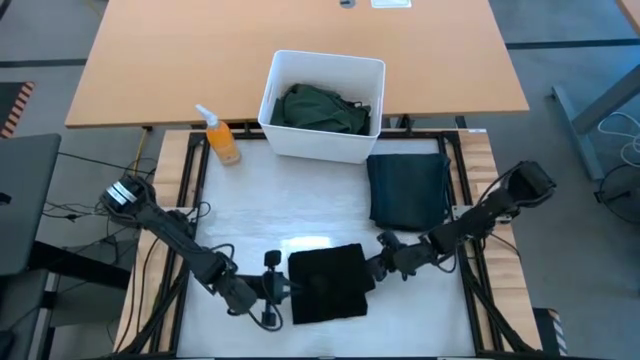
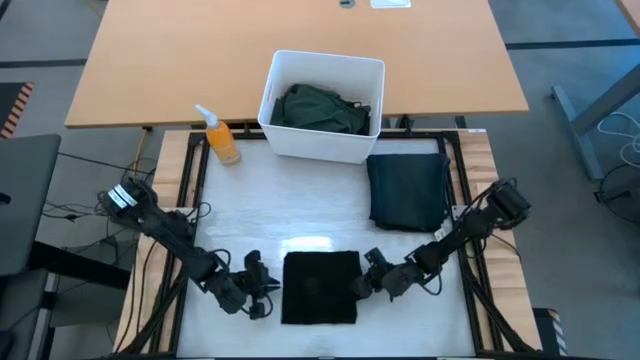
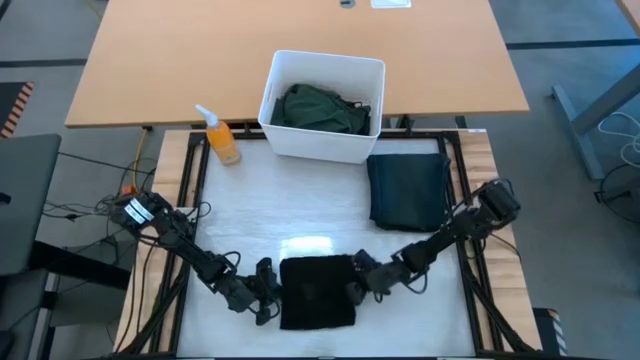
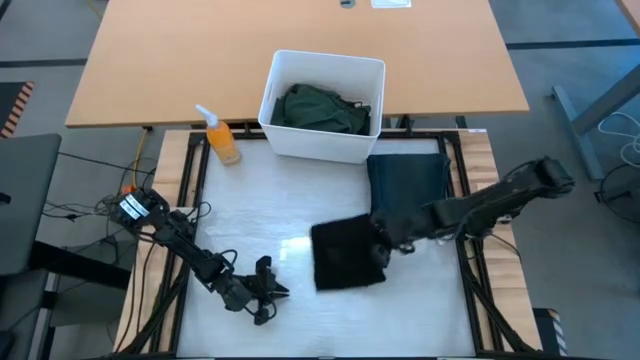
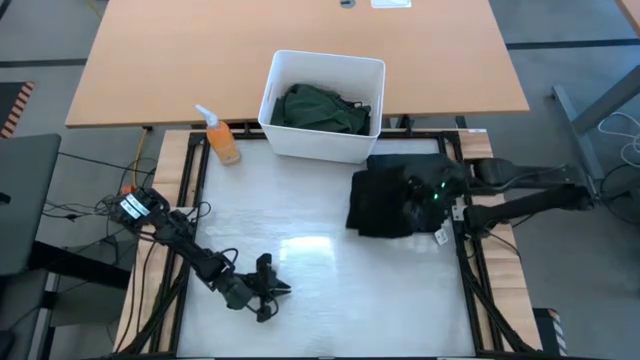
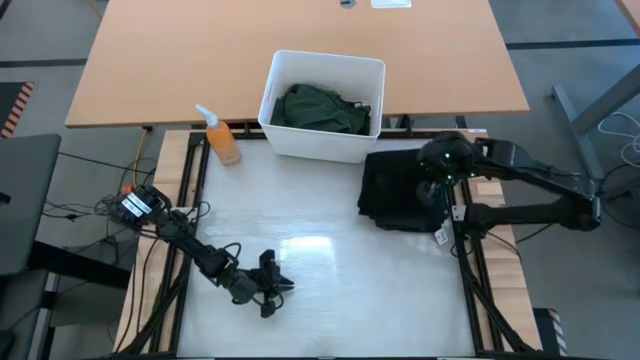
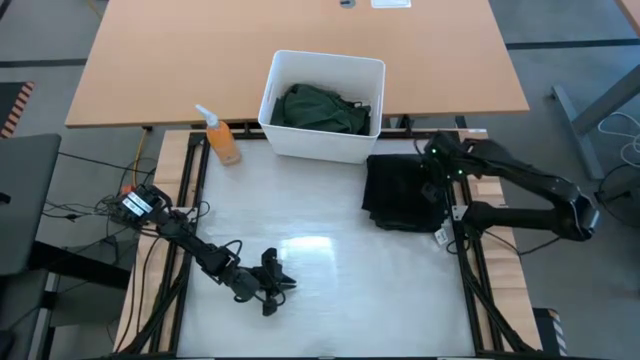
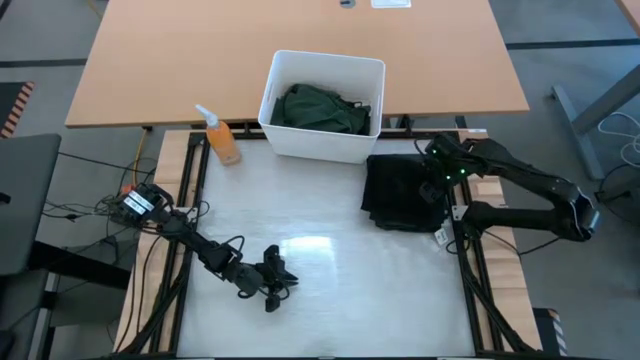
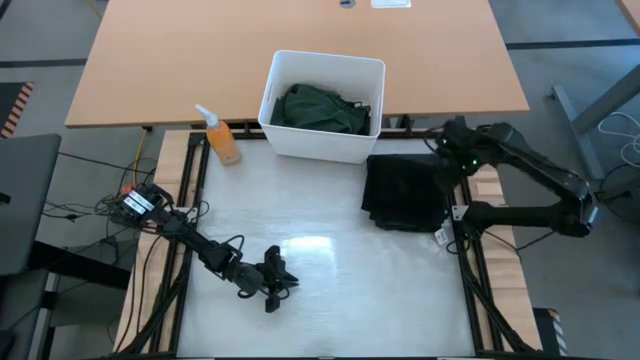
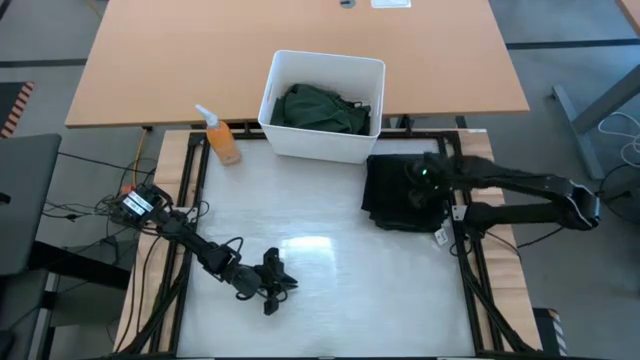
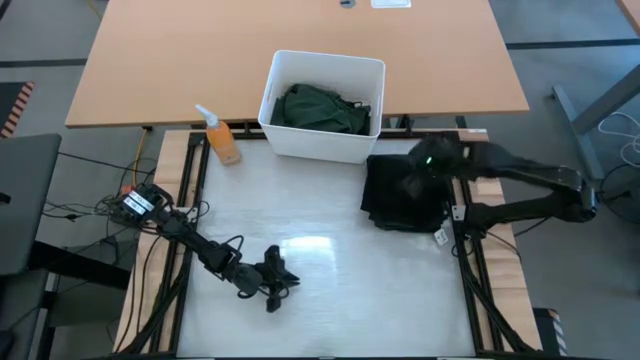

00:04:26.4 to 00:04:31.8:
Task: Fold laundry
Stack the folded black t-shirt on the dark blue jeans

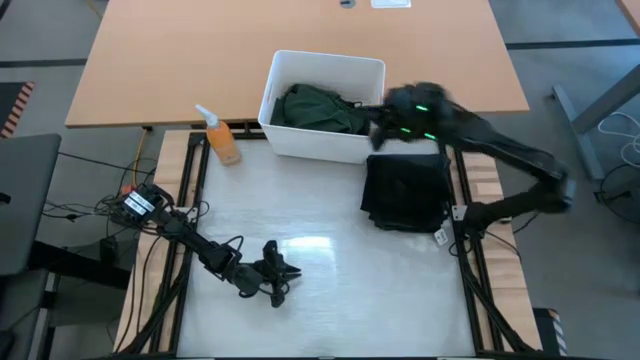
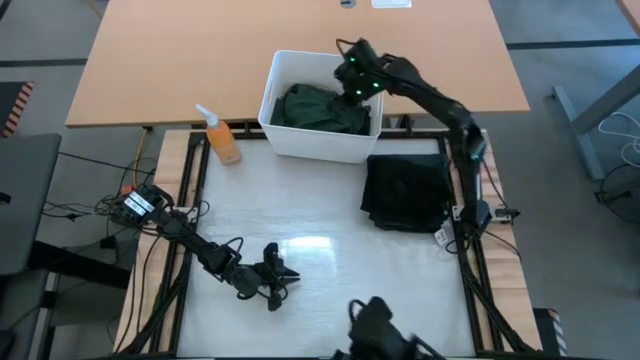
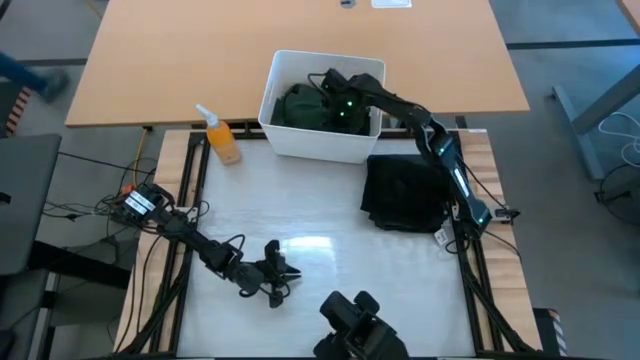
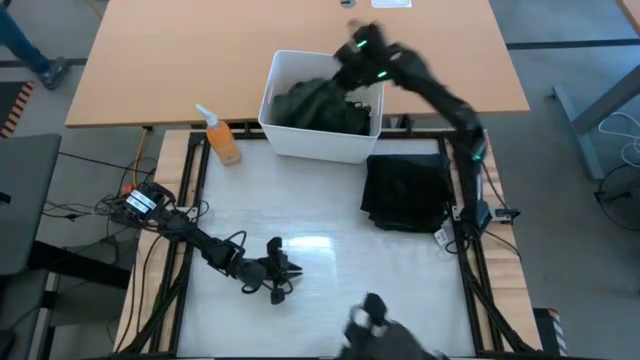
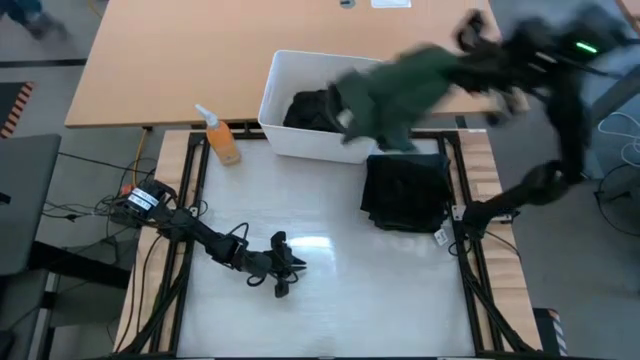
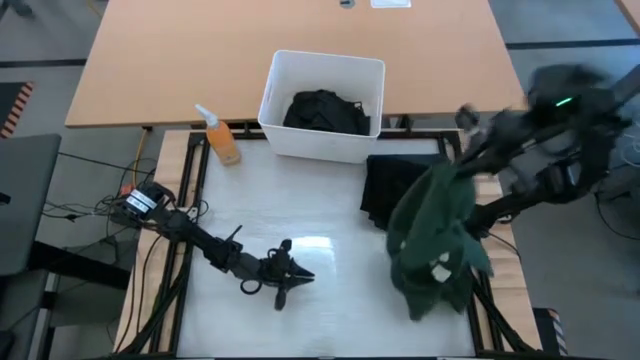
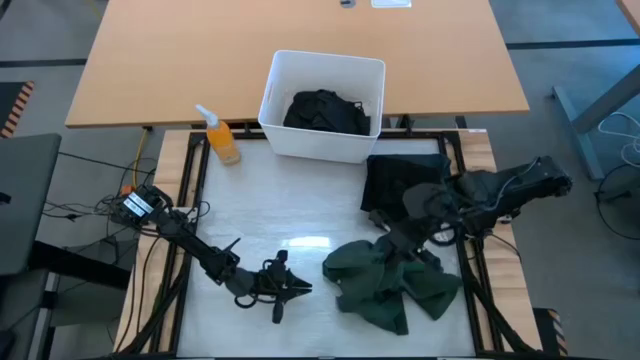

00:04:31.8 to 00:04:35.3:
Remove the green polo shirt from the white bin

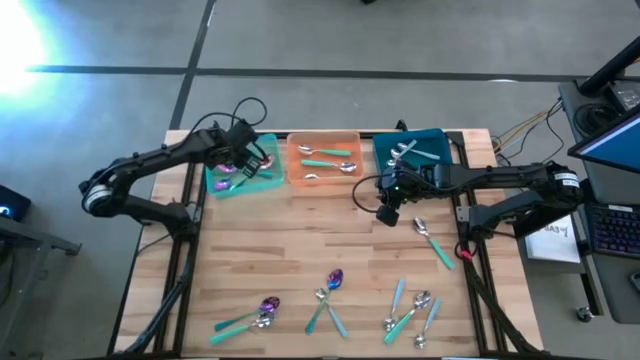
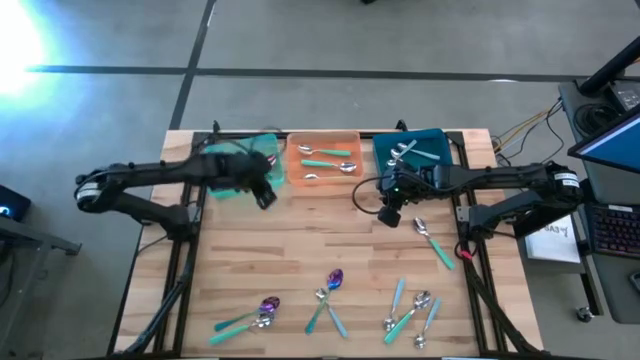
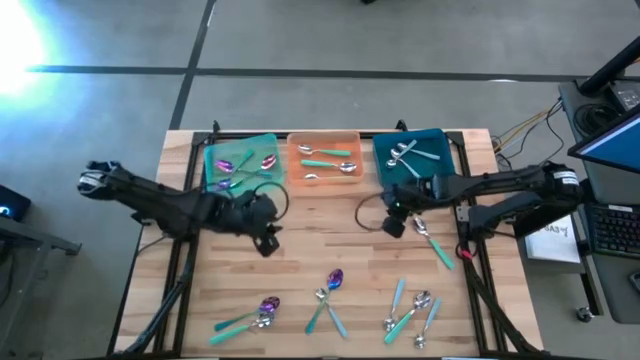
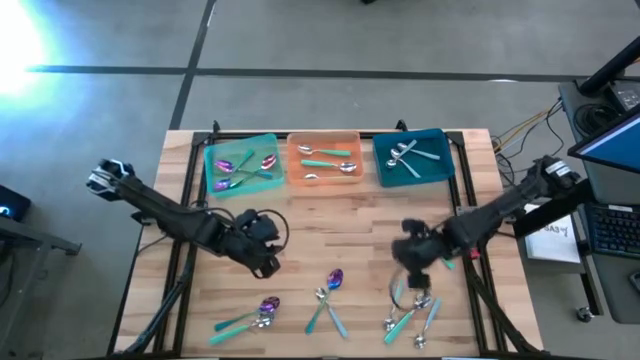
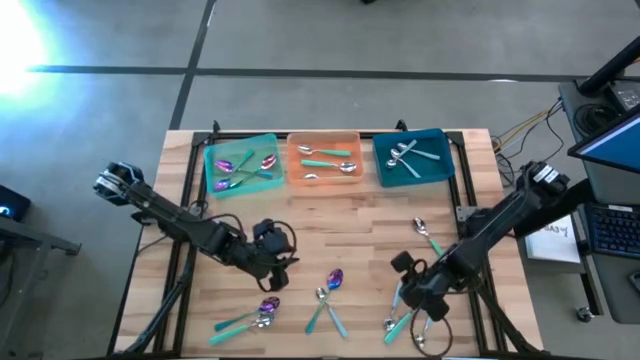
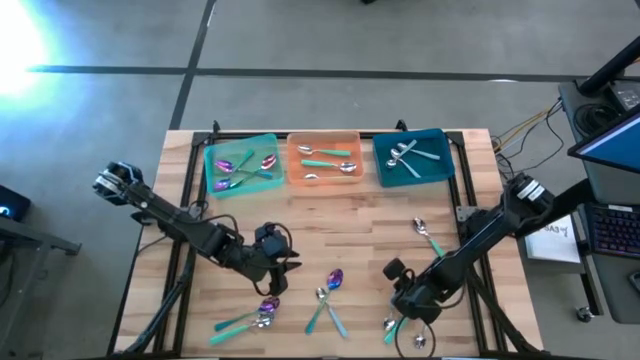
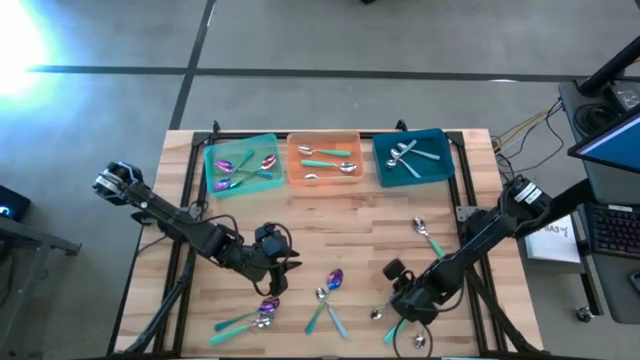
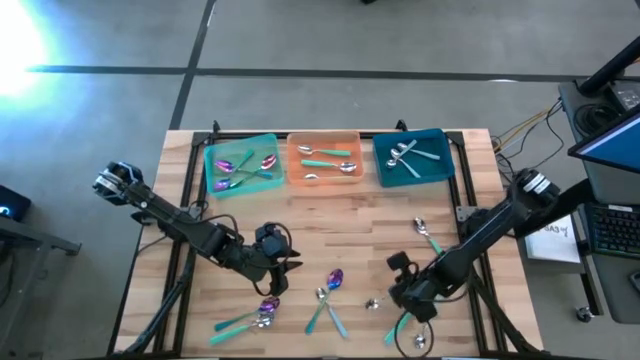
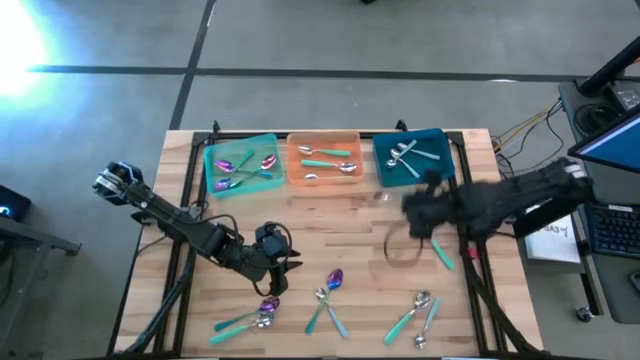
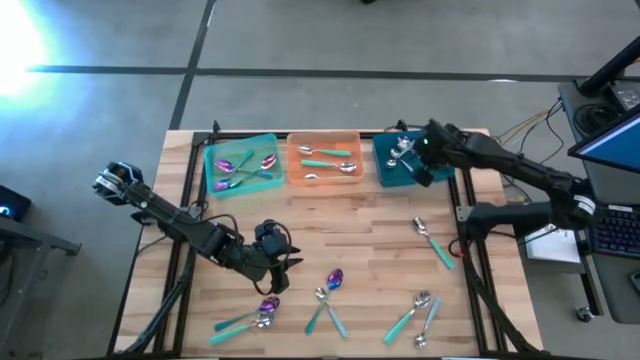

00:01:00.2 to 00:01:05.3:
Task: Sort silverware by color (type)
Put the light blue spoon into the blue bin

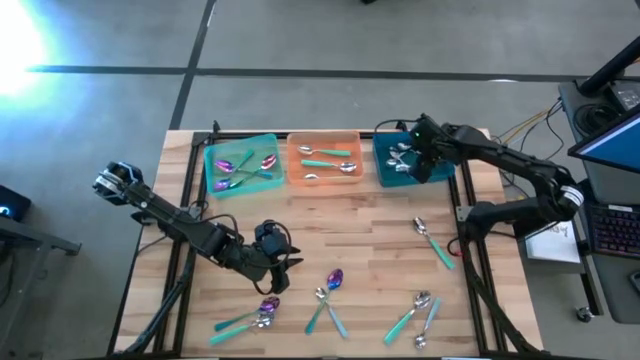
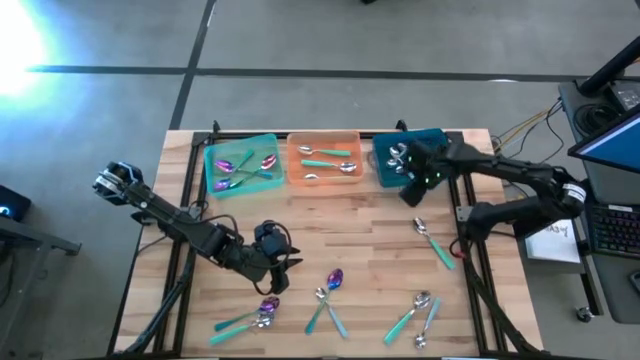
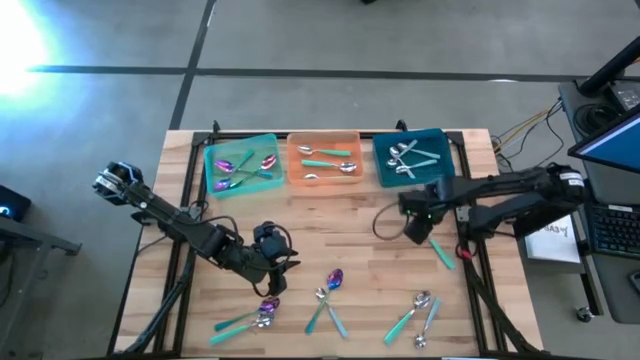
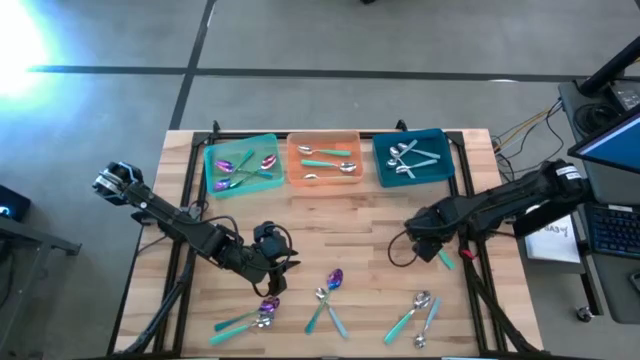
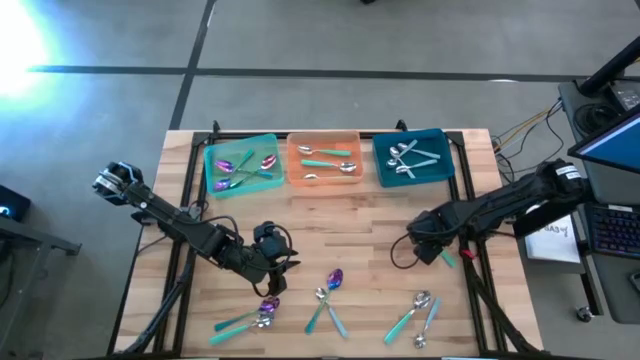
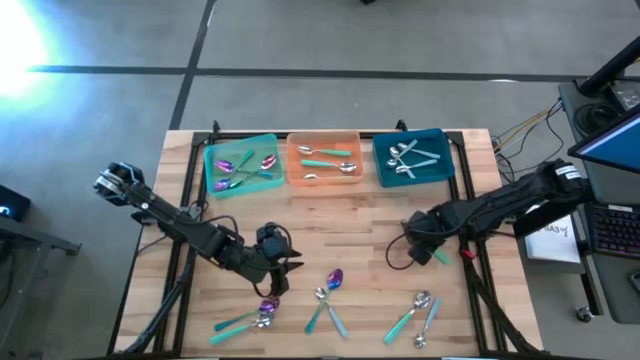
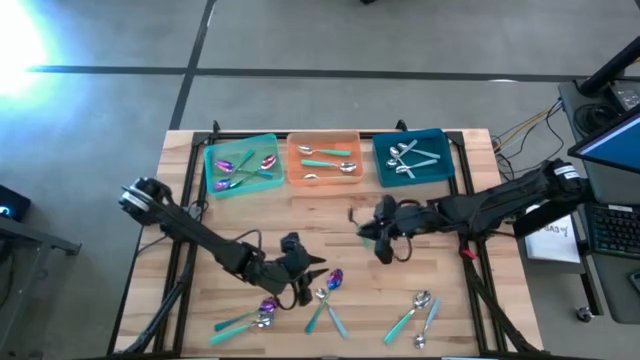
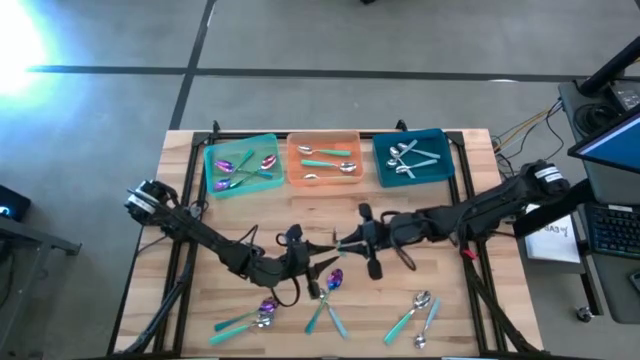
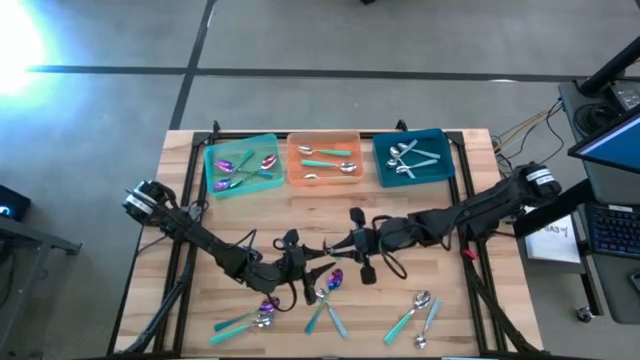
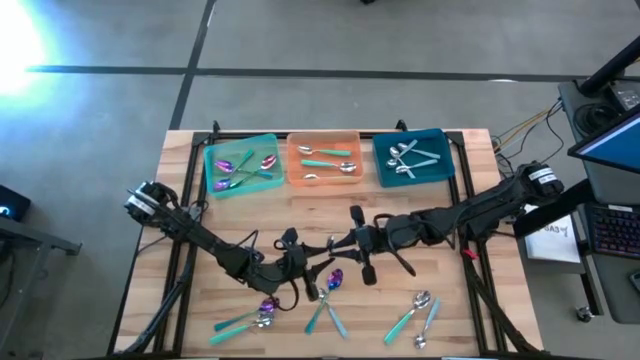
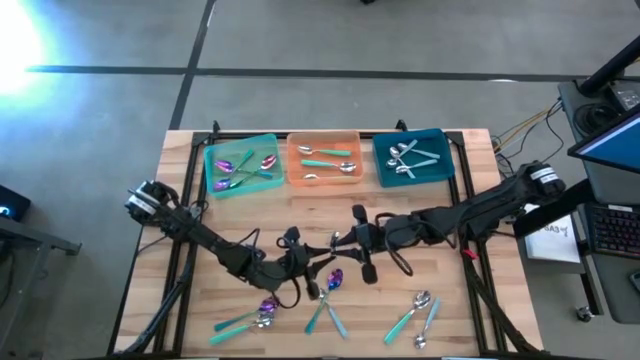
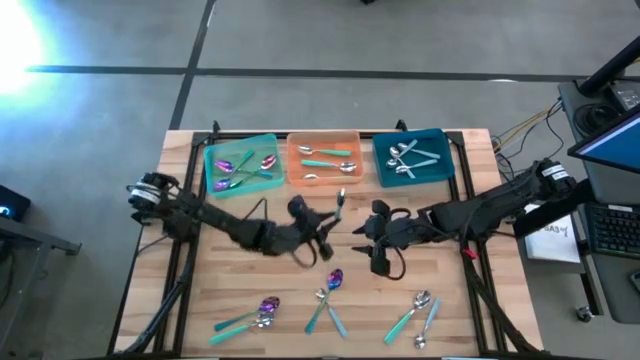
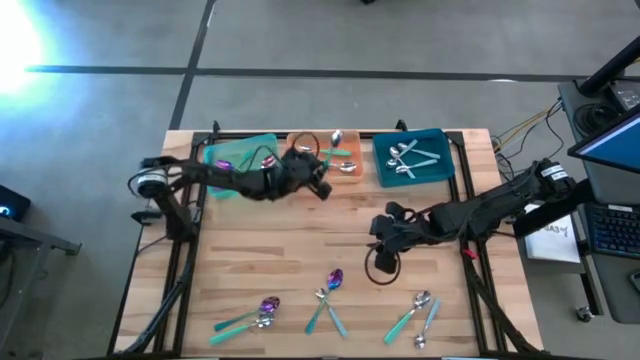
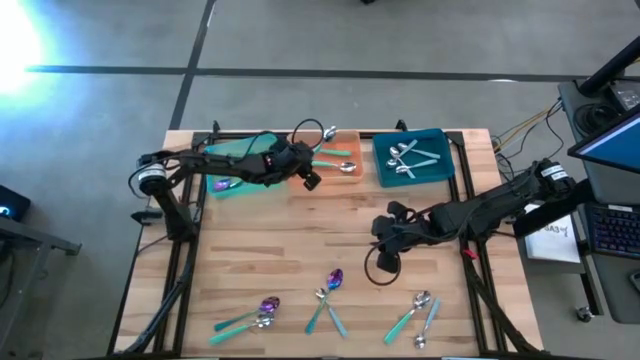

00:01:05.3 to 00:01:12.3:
Put the green spoon into the orange bin
